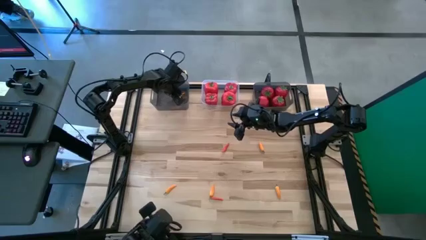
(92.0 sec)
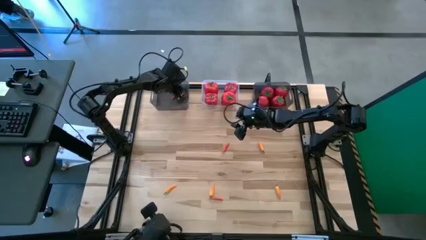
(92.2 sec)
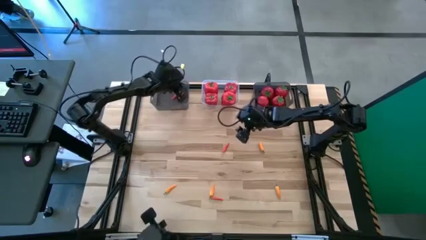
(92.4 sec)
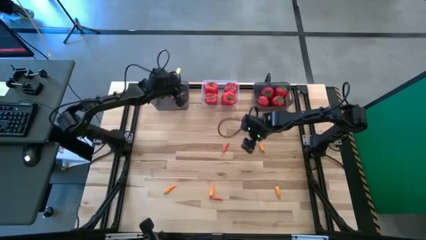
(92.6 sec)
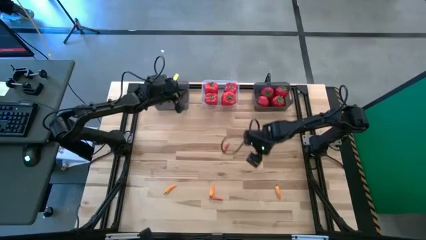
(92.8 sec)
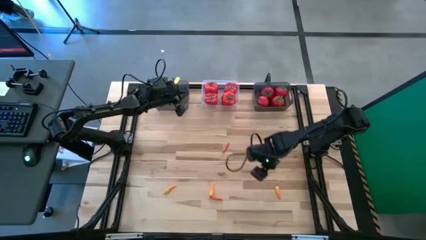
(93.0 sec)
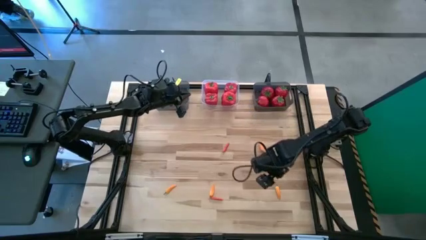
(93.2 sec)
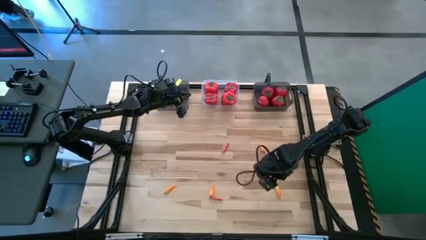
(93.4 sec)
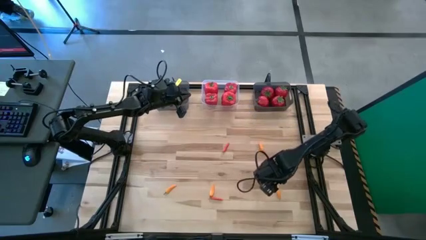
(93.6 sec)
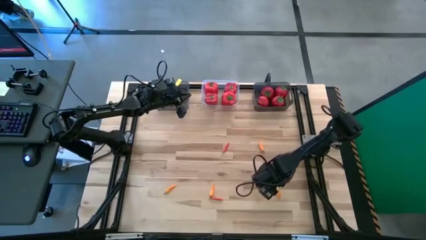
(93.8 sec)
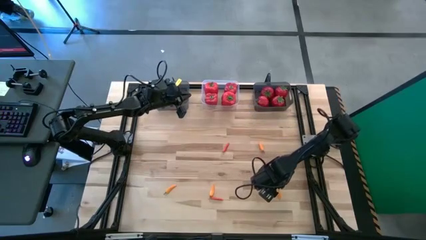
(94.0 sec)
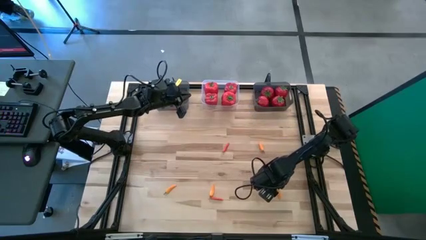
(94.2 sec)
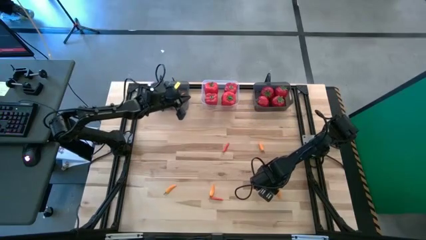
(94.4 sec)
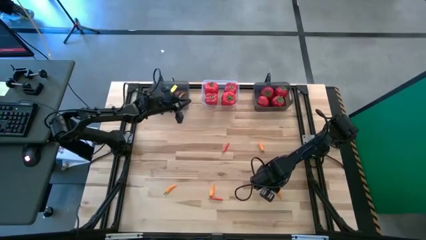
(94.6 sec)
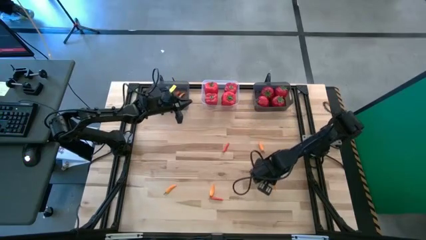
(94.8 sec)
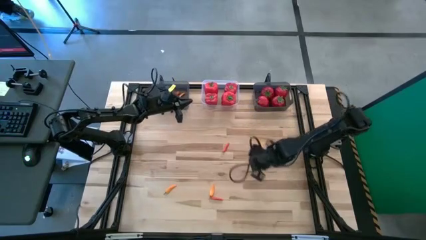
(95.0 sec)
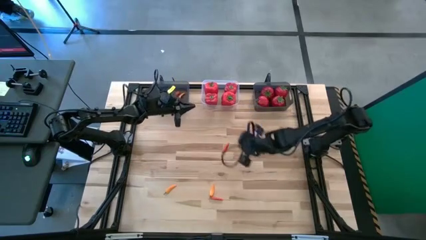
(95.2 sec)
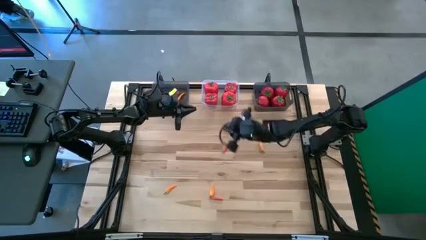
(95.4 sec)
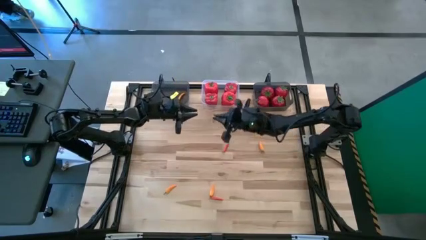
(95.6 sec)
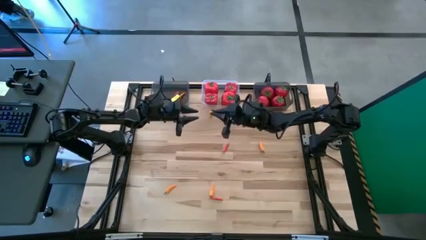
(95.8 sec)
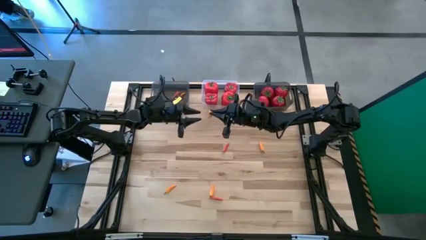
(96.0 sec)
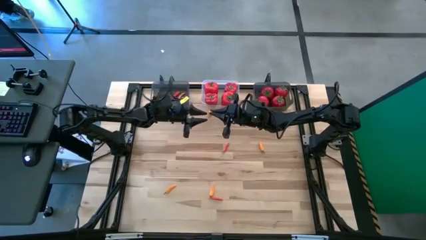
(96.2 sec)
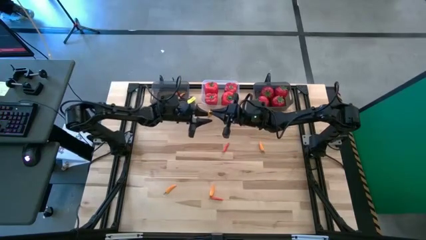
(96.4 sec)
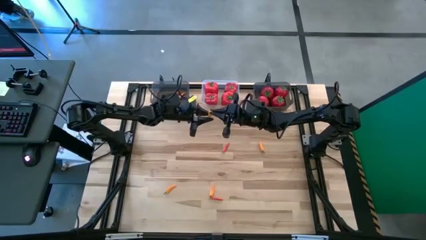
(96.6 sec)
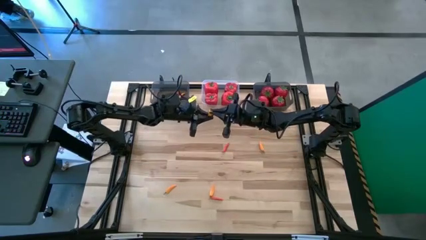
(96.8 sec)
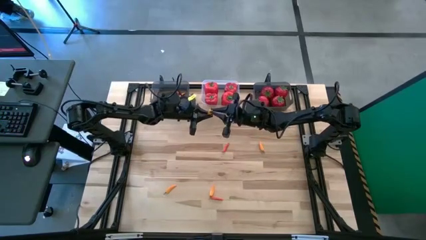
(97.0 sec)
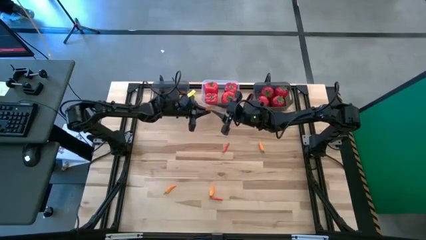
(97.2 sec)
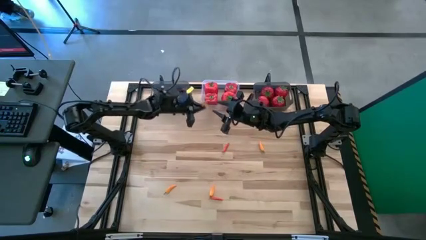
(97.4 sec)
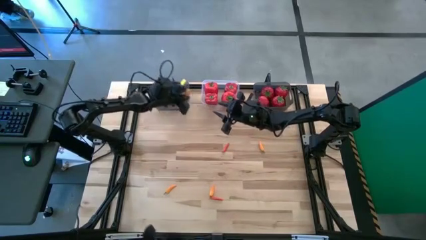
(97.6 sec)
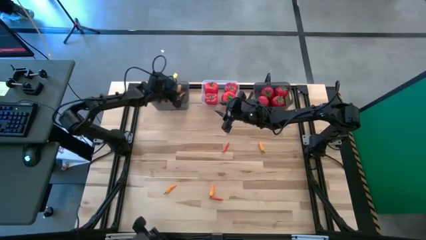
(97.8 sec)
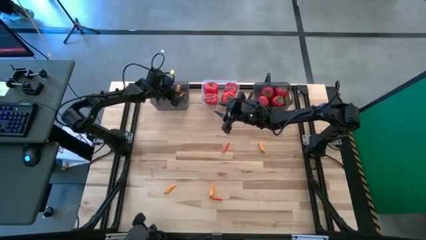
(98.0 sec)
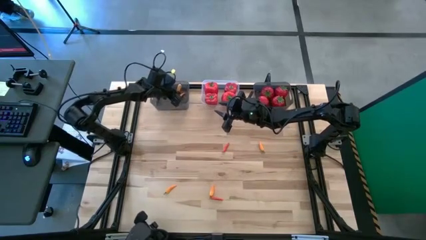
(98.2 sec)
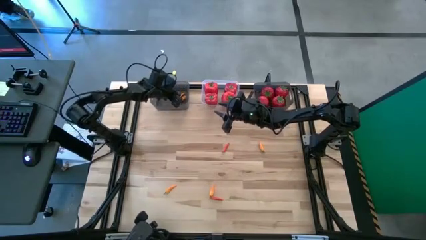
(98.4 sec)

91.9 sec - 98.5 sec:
Task: Sort produce into baskets
Put the yellow chili pepper into the left black bin

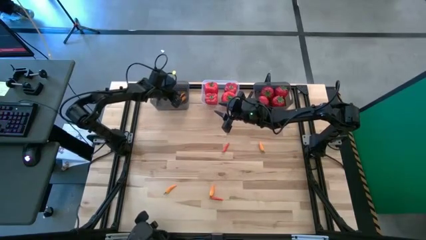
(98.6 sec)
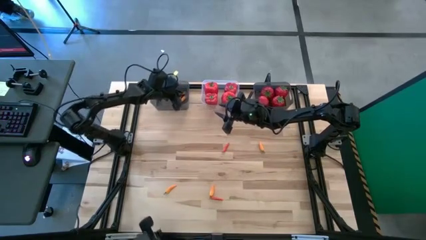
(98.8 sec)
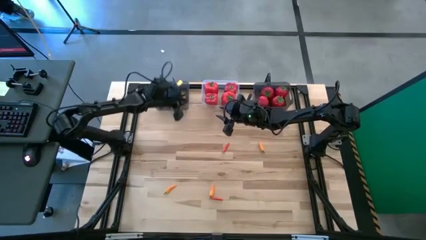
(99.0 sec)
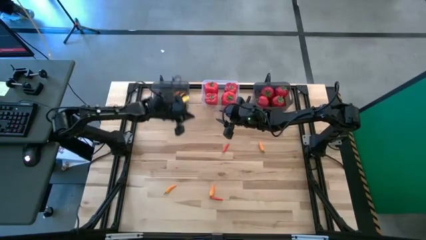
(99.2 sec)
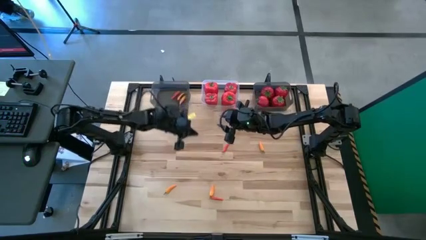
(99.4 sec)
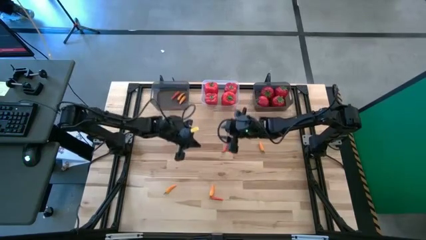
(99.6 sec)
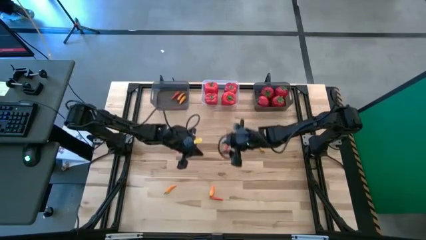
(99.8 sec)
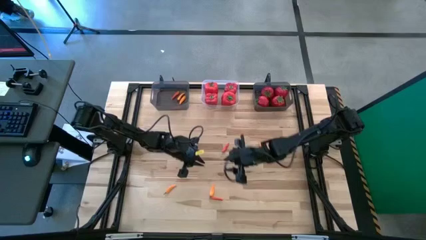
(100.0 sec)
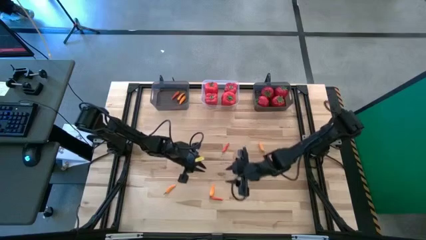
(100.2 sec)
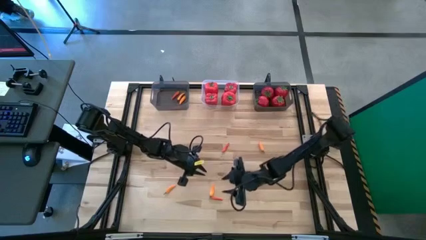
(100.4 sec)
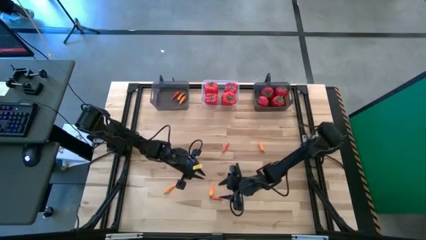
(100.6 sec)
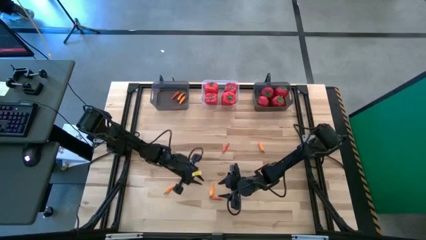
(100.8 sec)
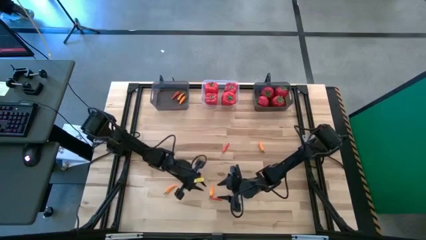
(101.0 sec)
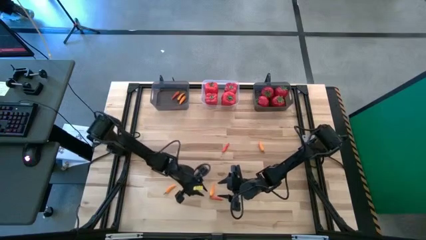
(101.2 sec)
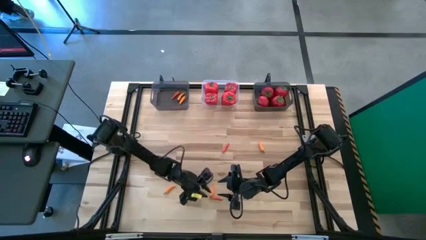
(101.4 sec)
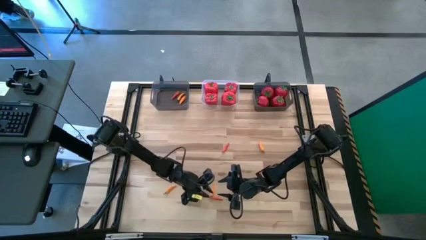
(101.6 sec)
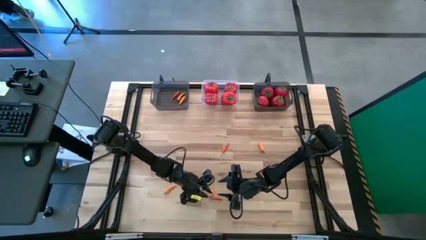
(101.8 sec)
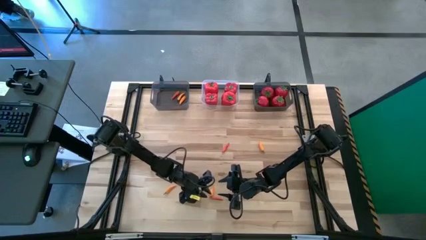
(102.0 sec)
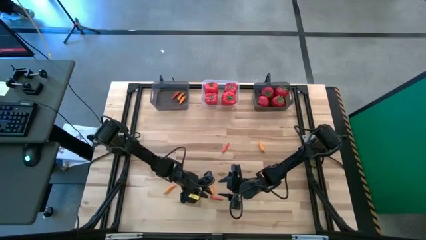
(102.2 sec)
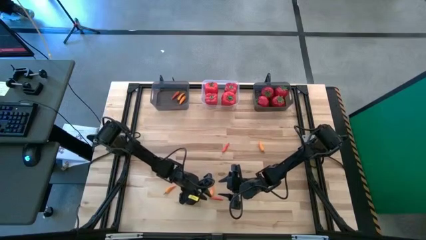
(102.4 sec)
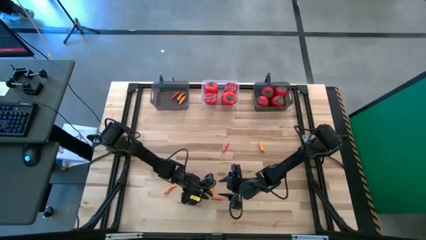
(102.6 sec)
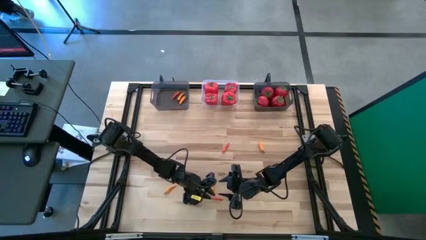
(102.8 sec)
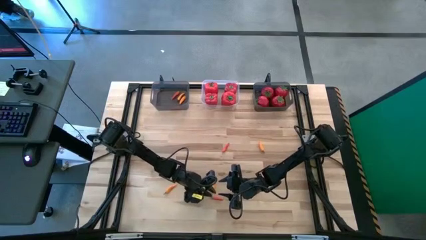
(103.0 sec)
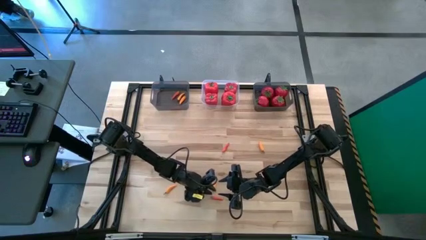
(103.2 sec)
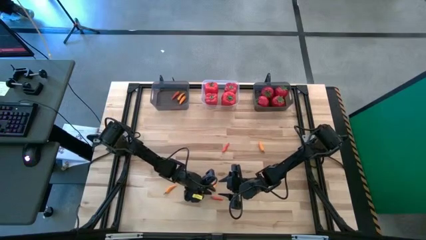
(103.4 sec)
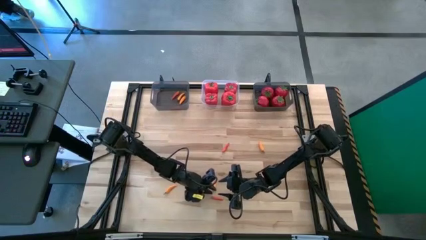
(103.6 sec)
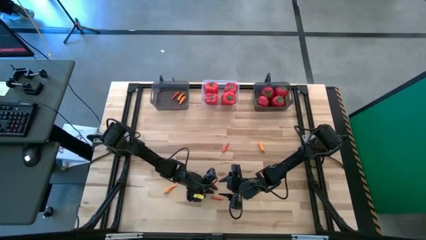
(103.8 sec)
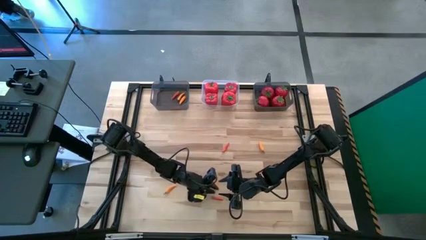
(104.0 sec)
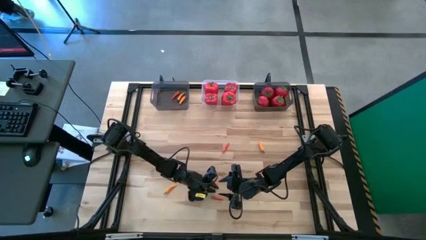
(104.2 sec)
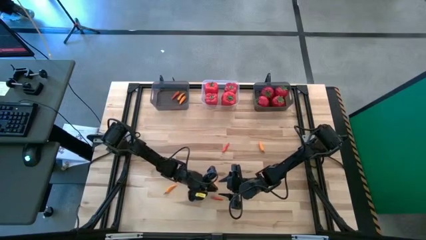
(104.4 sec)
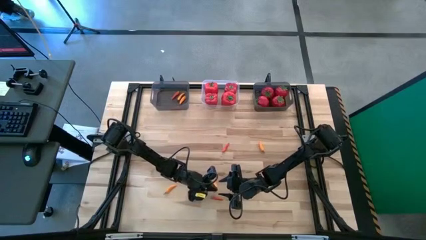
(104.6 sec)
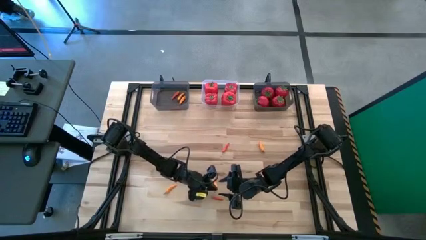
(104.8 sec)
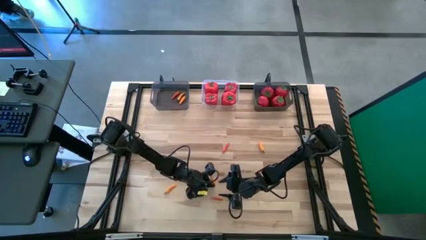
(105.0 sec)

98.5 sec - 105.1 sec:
Put the yellow chili pepper into the left black bin

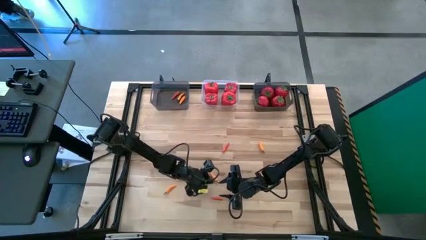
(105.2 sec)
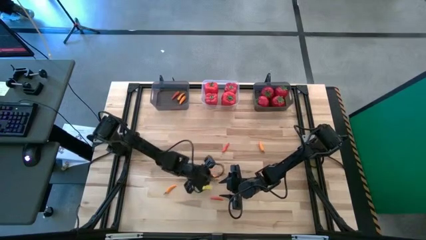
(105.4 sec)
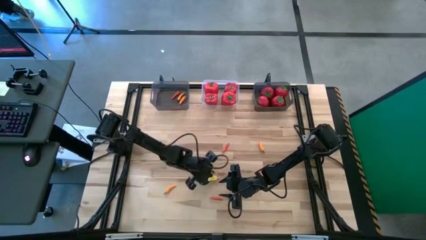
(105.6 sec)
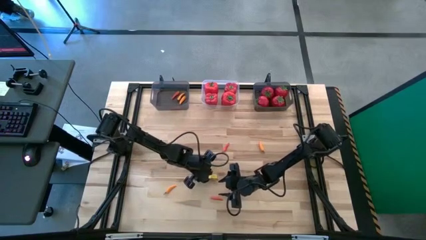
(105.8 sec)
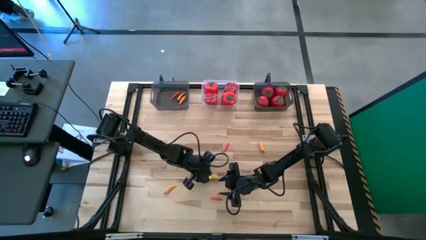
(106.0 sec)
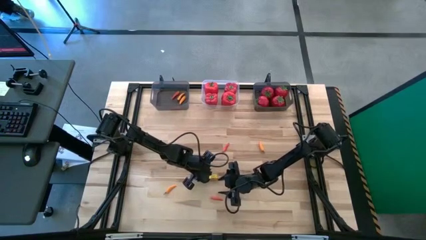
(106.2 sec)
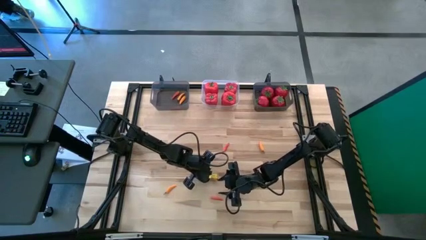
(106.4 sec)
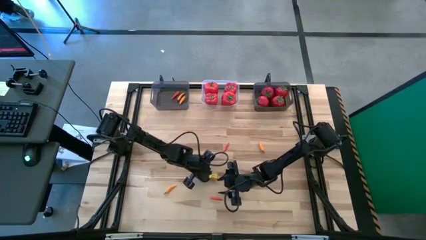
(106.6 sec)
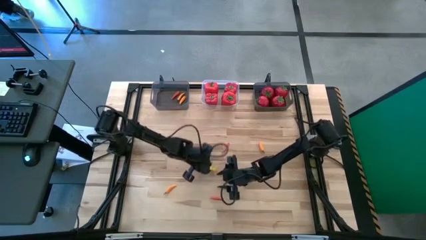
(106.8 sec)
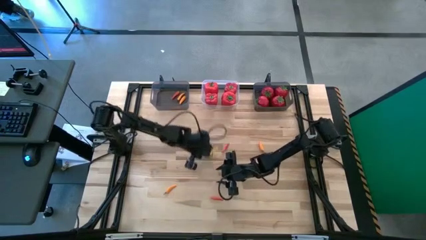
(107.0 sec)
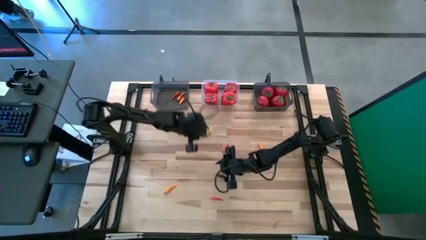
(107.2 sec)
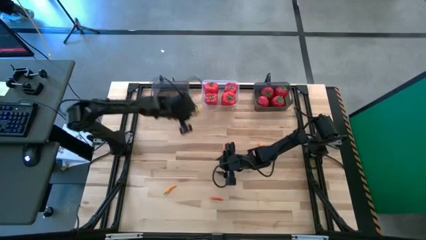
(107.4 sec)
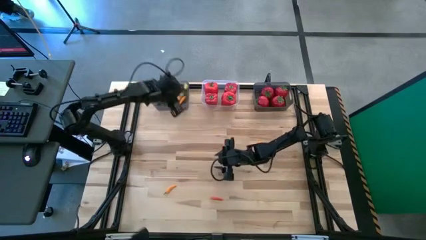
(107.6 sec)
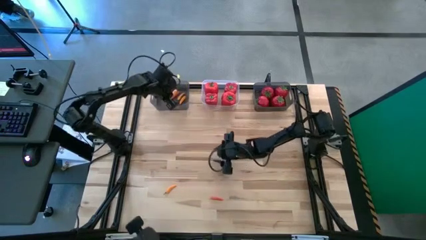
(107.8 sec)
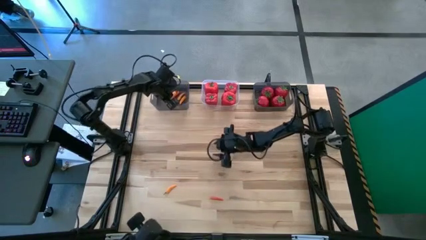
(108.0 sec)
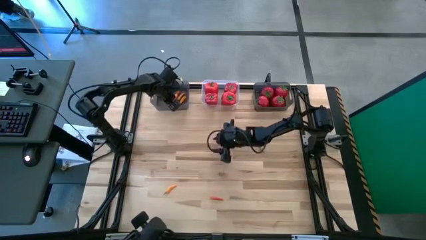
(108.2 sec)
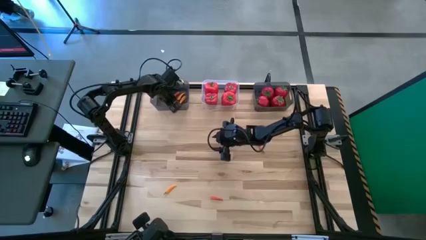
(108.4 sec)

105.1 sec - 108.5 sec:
Put the yellow chili pepper into the left black bin
